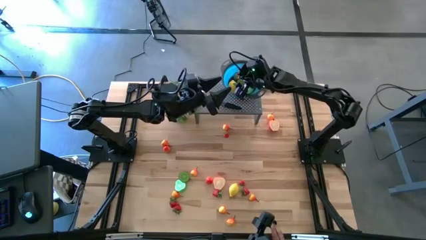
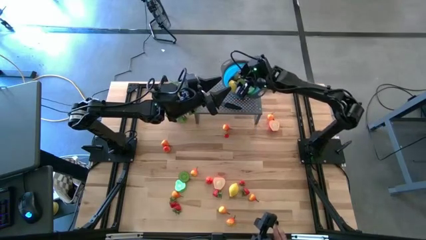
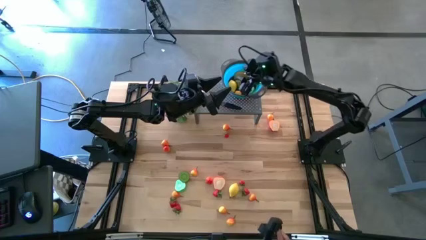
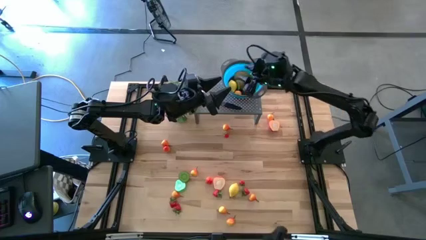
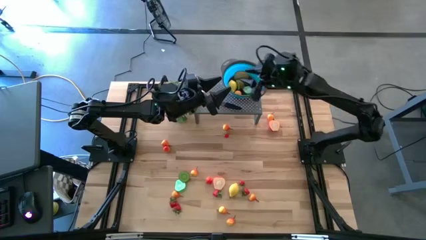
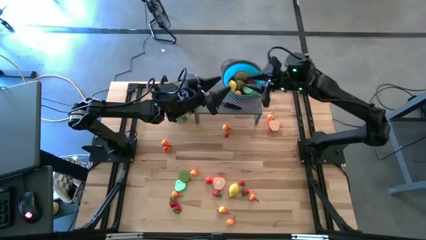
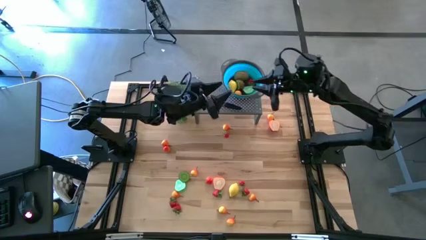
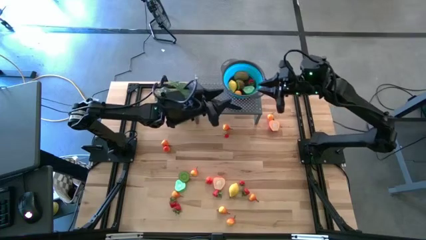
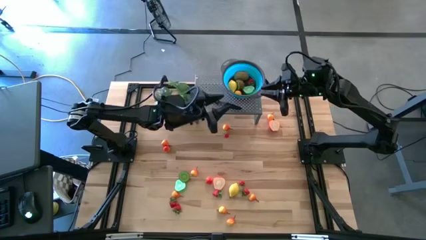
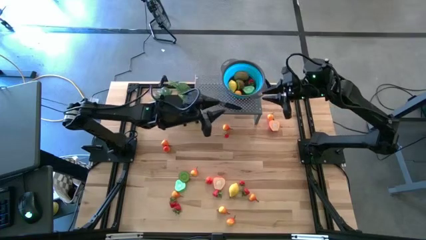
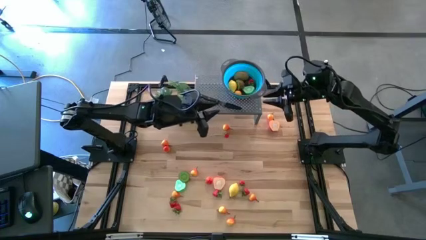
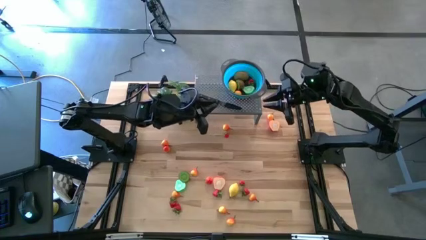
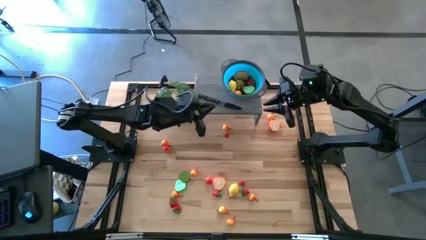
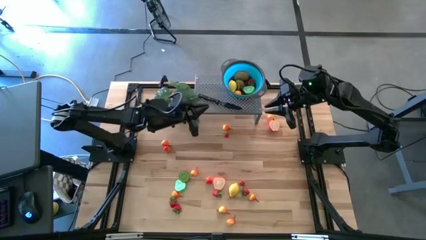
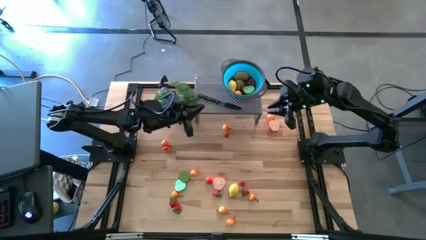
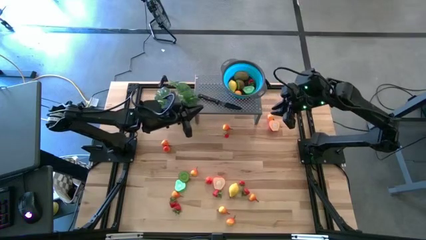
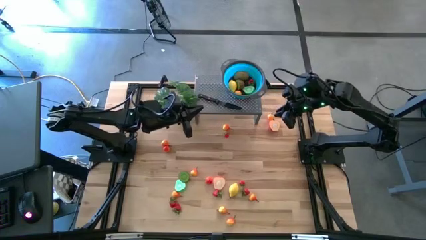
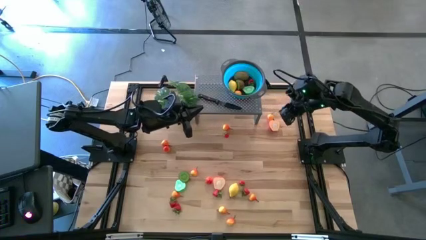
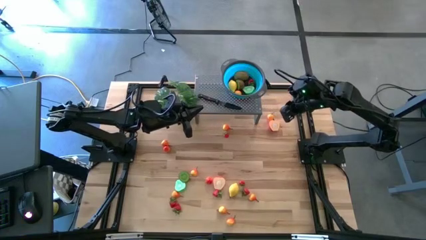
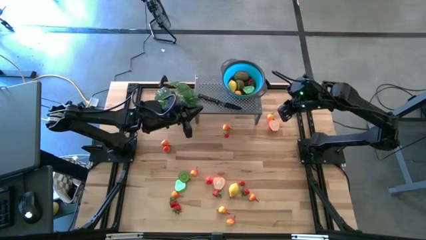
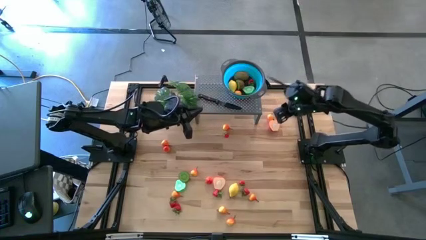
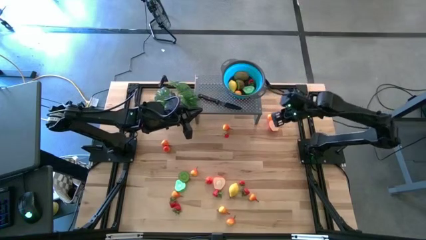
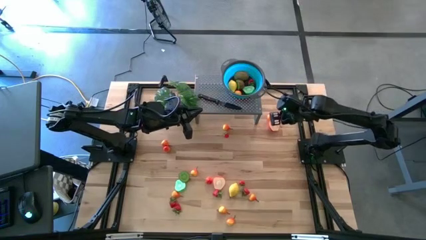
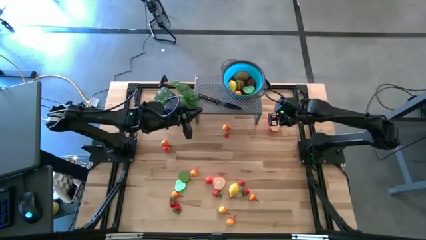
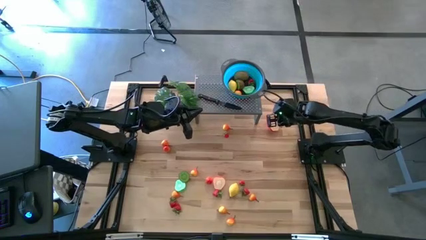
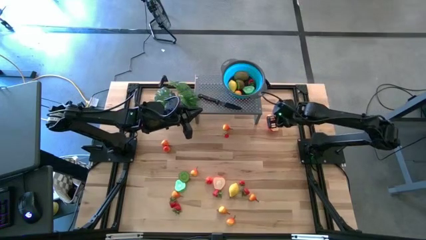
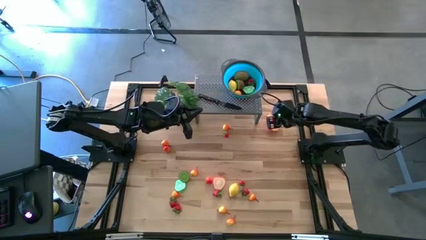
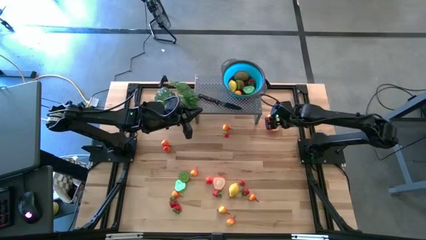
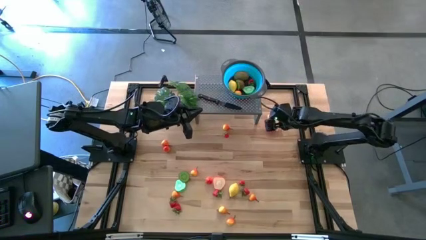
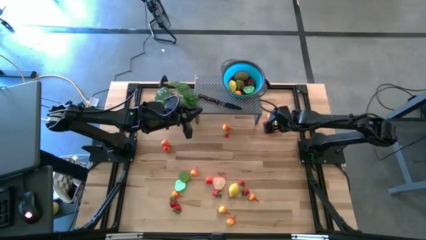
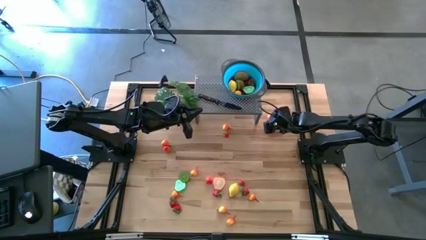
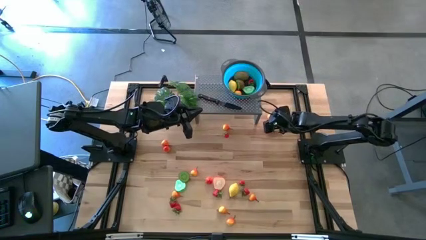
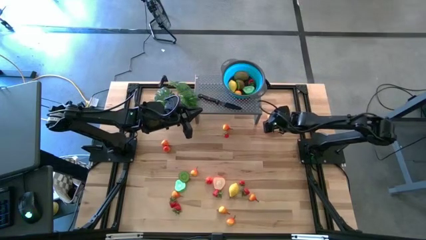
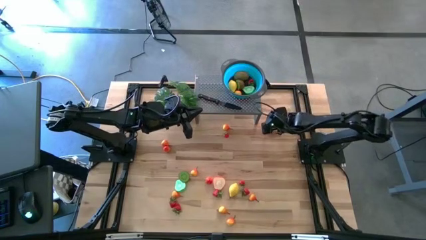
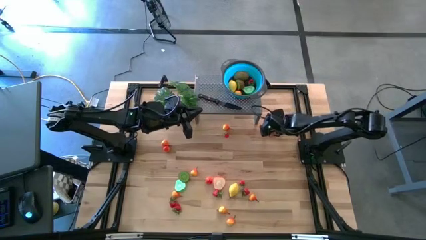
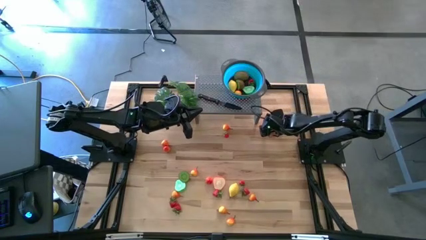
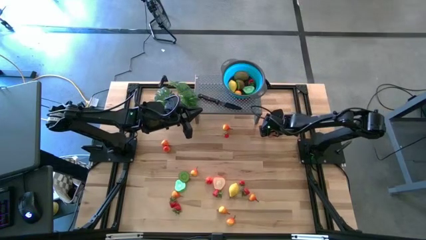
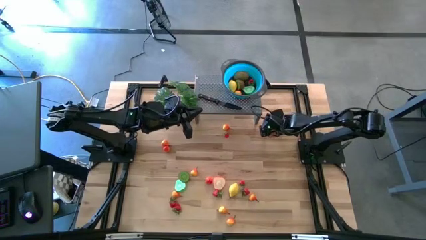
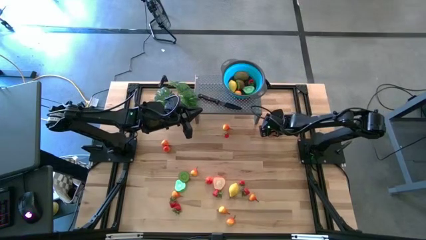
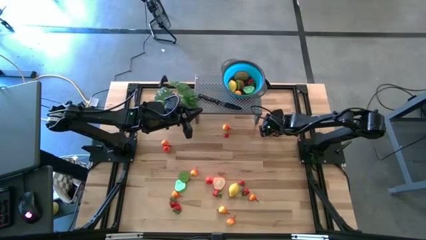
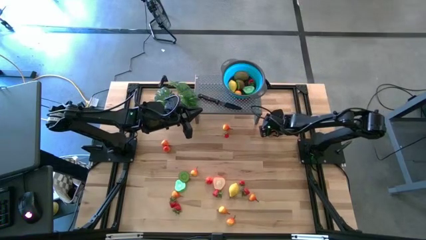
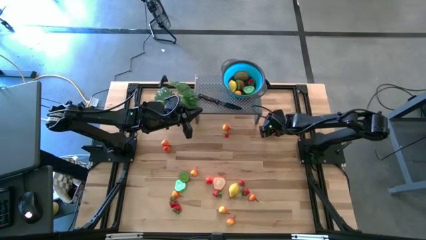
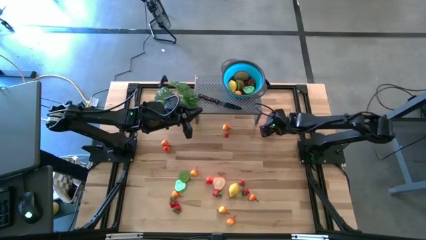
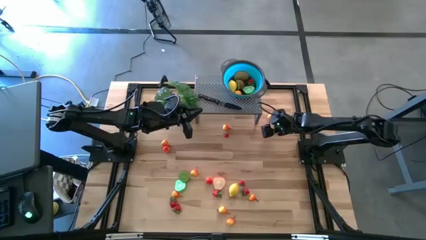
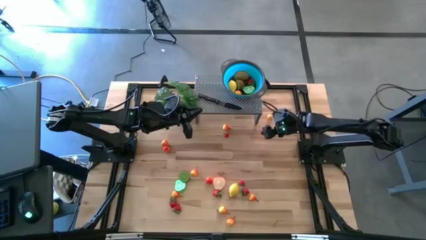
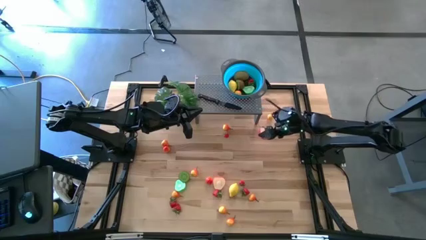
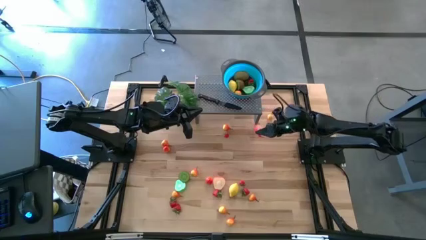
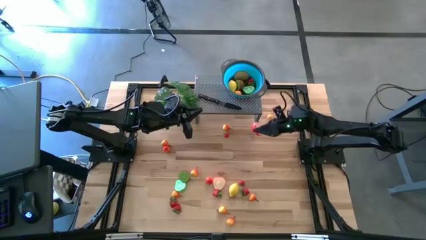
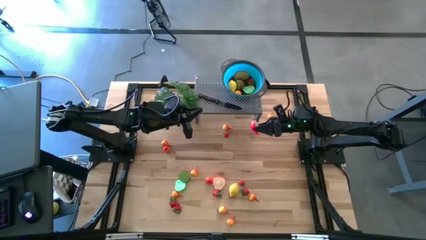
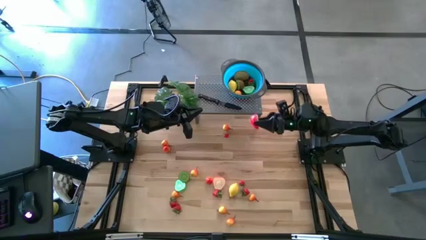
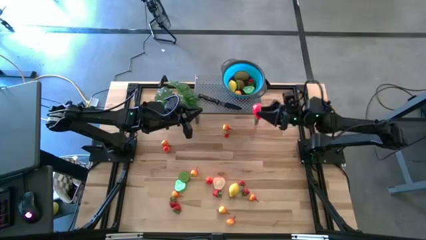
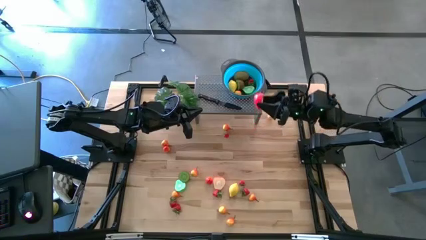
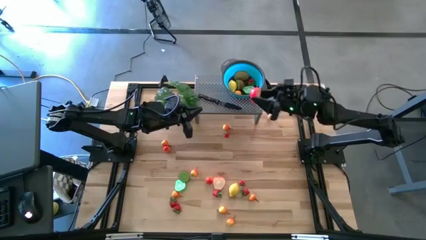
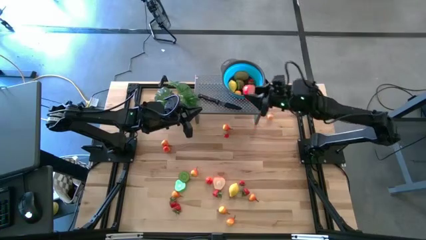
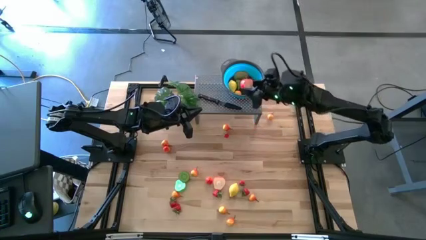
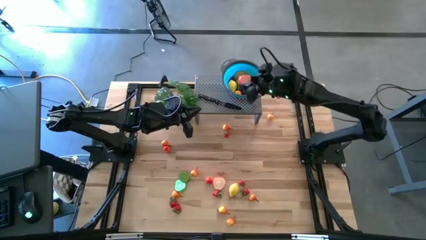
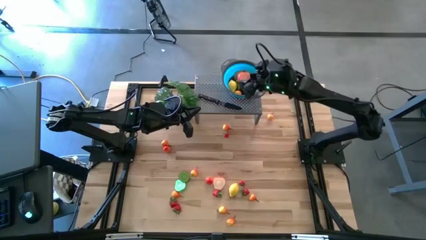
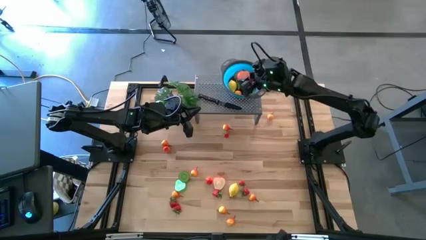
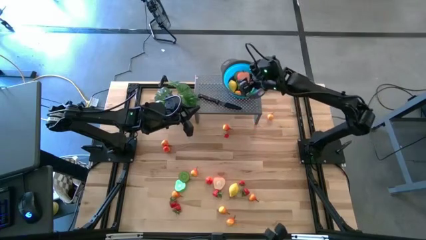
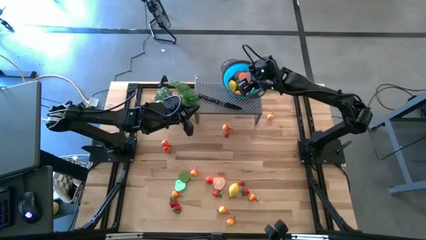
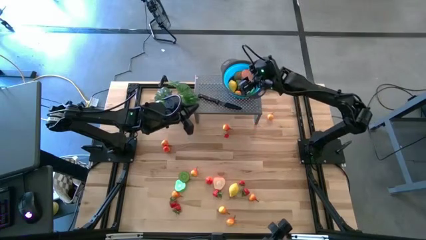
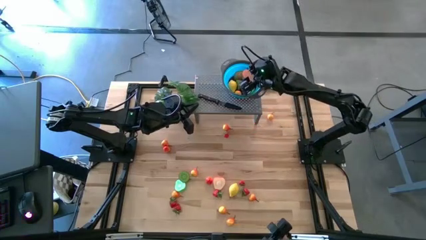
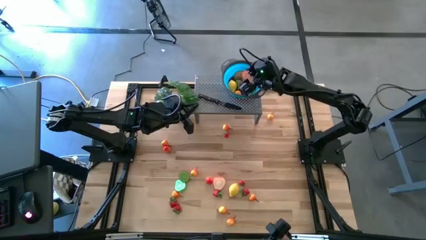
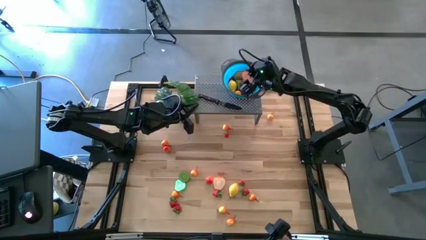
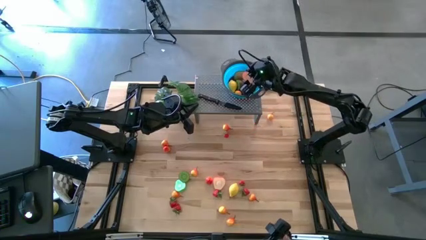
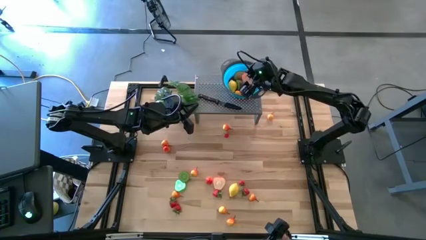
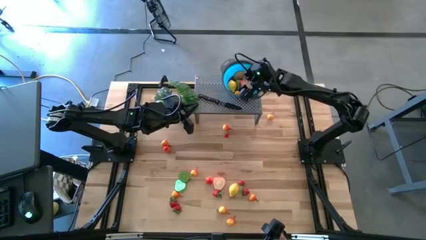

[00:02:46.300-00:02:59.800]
Task: Pick & Place Fruit
Put the red apple in the blue bowl on the shelf

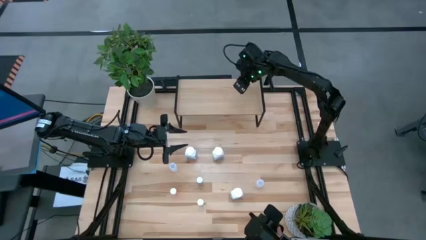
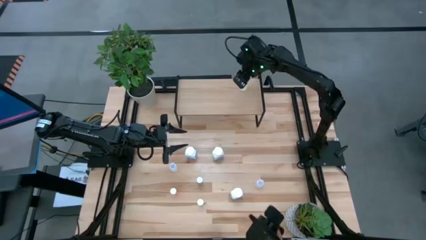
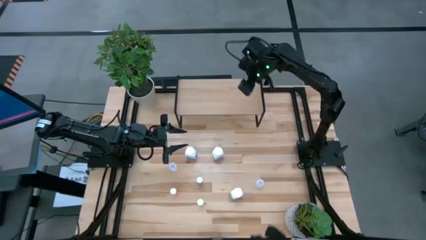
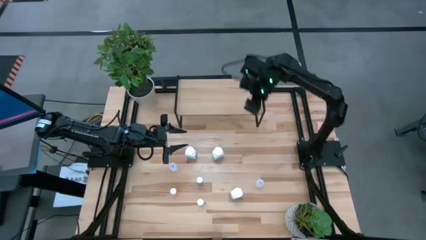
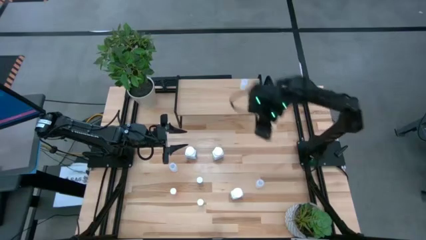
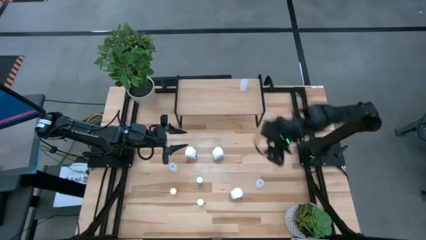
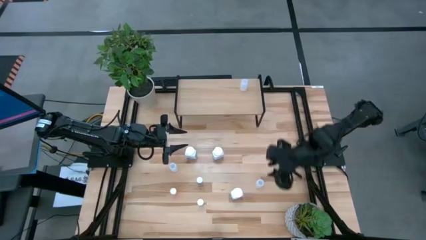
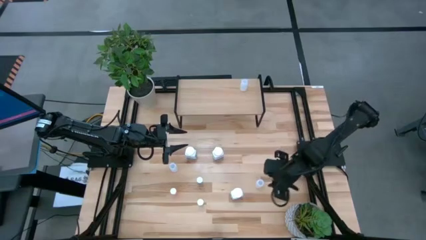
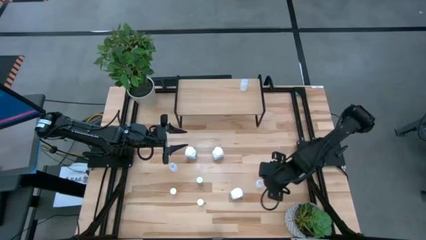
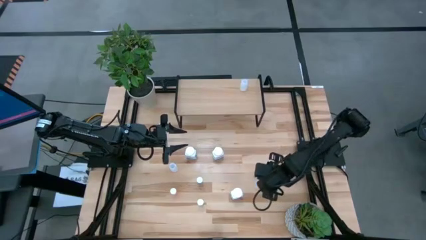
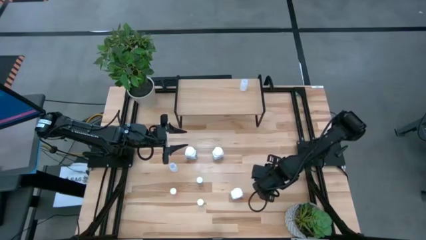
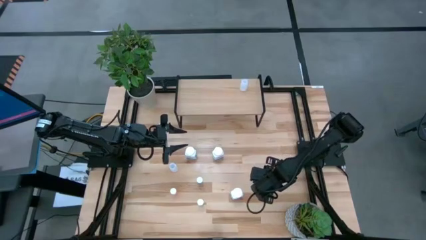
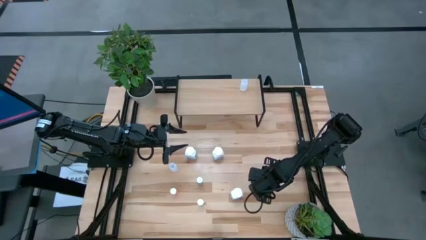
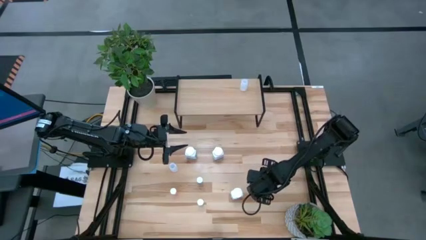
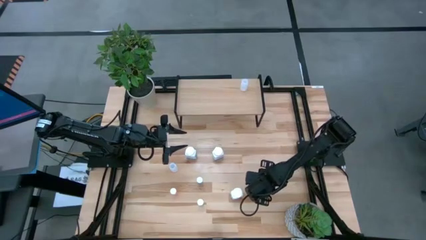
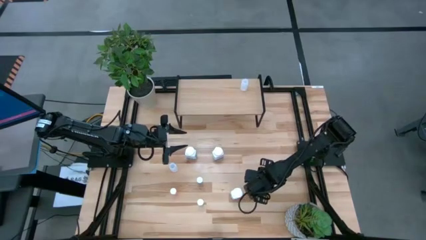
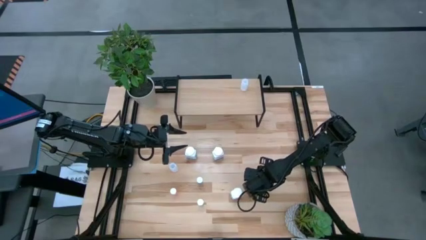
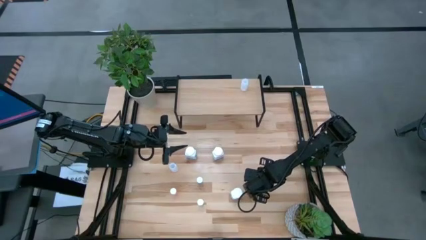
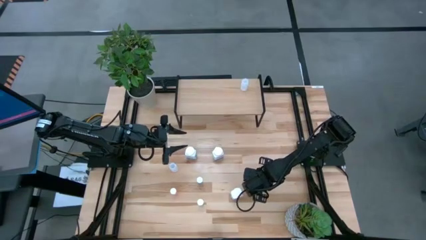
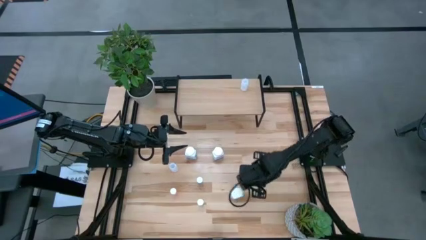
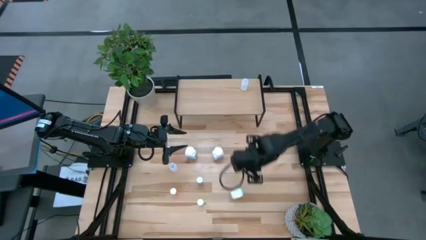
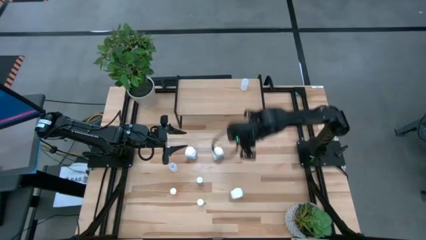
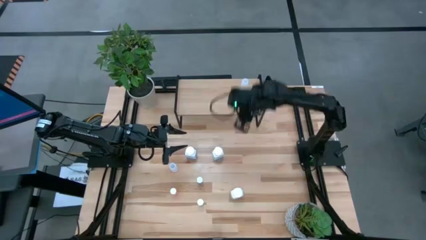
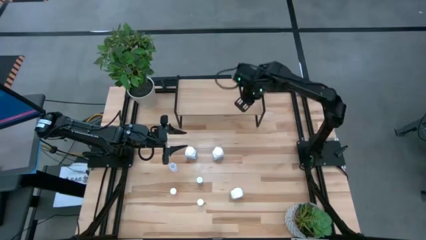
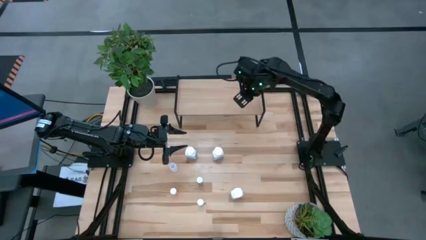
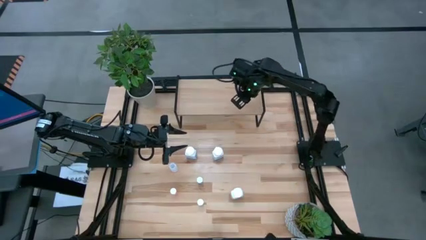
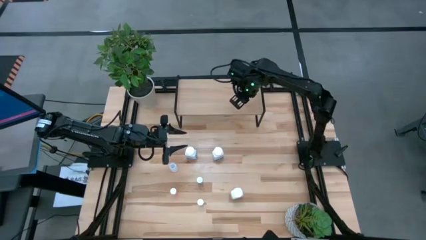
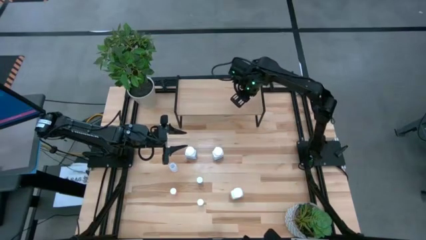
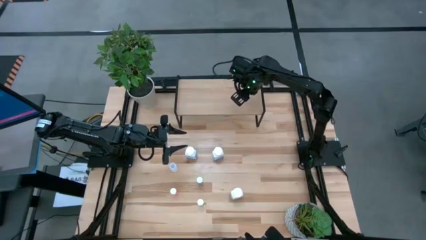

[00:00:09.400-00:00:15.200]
Task: Pick and place medicine bottles onto shelf by color
Align the right white bottle with the other white bottle on the shelf
